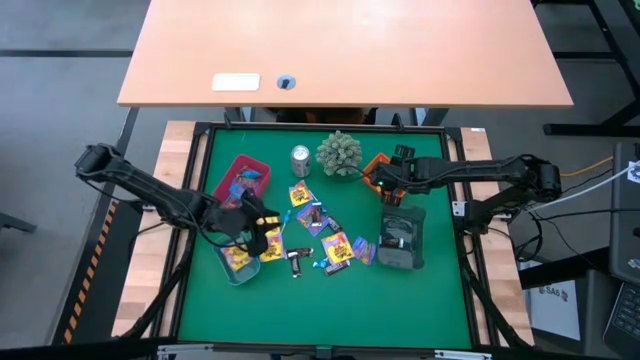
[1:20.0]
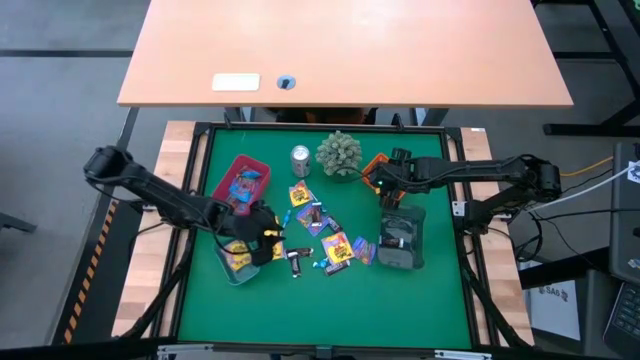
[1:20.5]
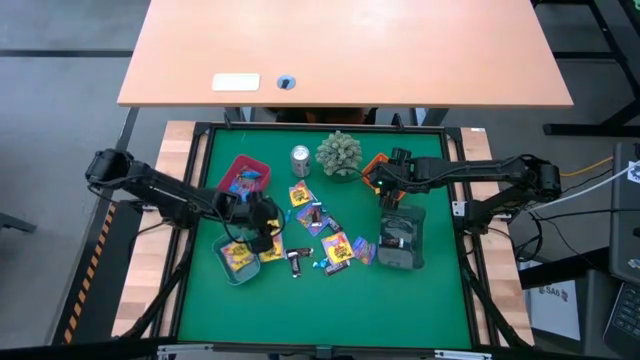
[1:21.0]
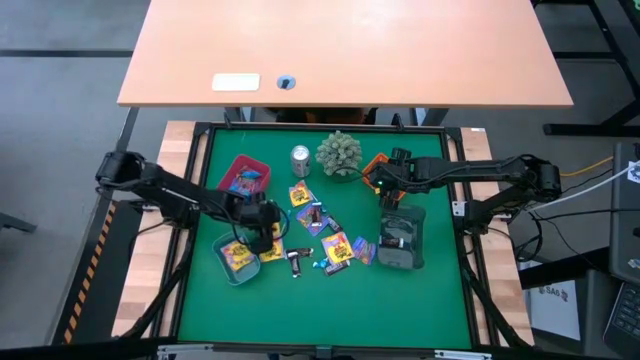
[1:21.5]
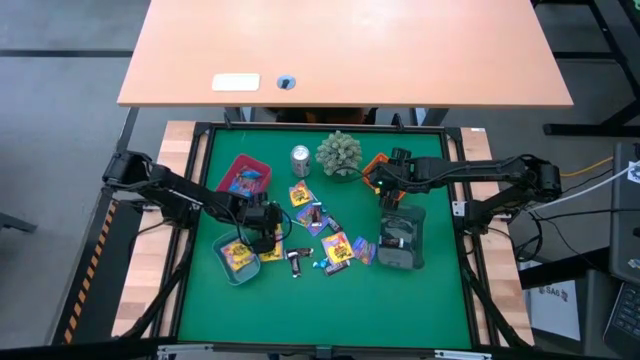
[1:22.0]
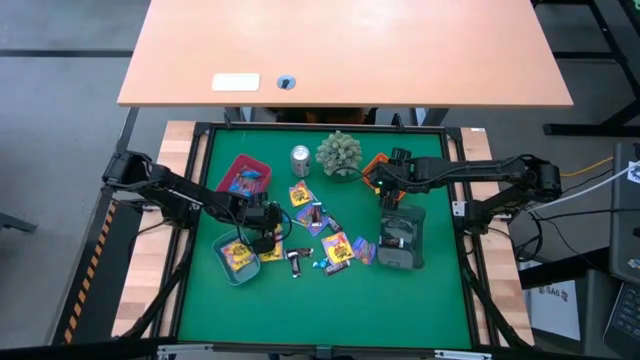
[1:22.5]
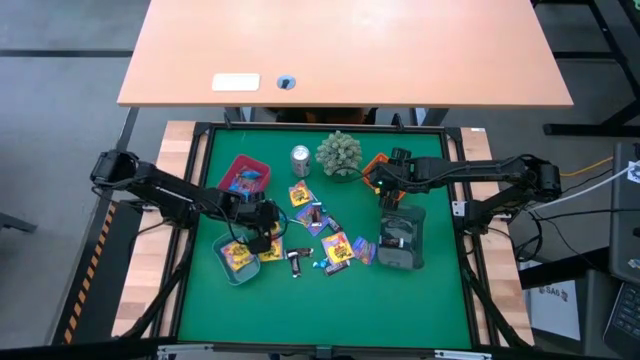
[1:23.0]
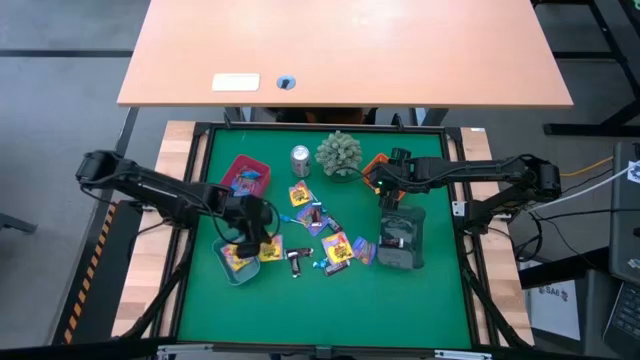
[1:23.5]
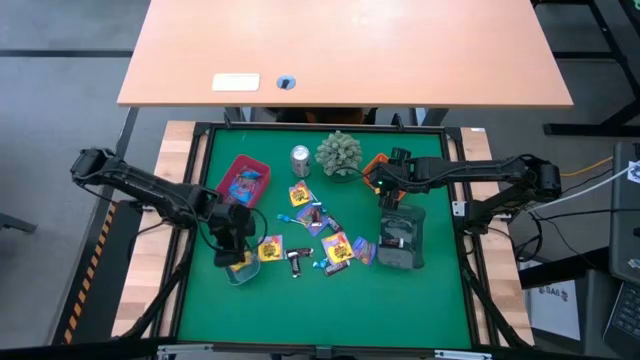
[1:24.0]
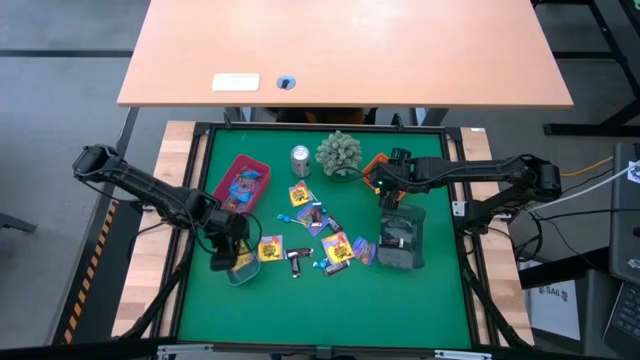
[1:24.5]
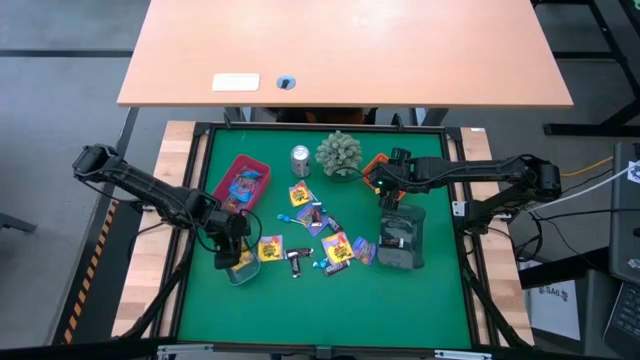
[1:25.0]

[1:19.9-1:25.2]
Task: Sort candy
Put the yellow candy into the blue transparent bin

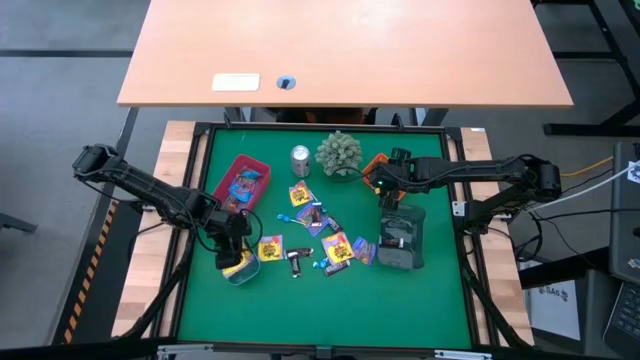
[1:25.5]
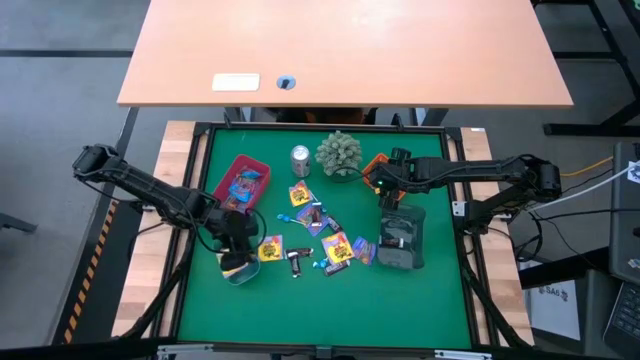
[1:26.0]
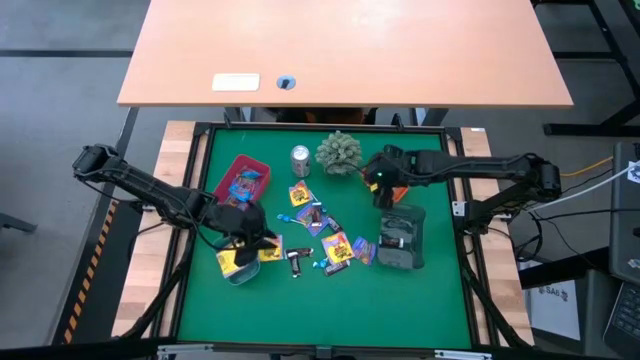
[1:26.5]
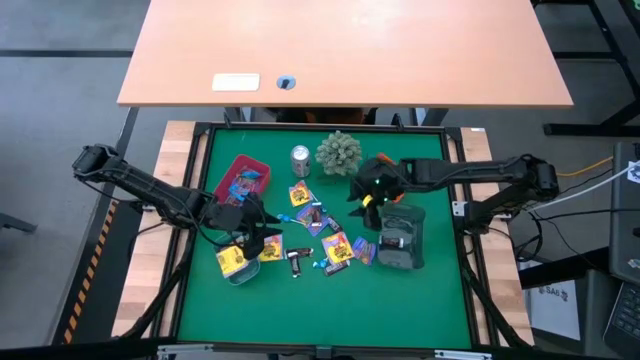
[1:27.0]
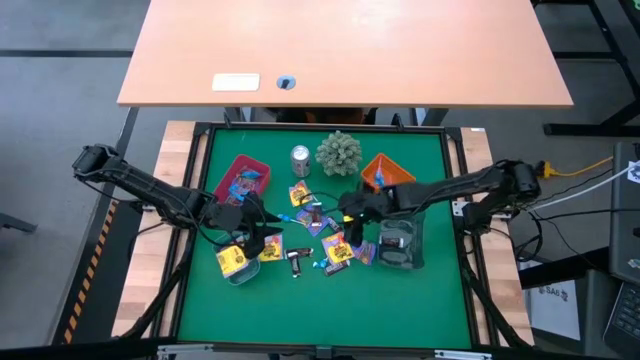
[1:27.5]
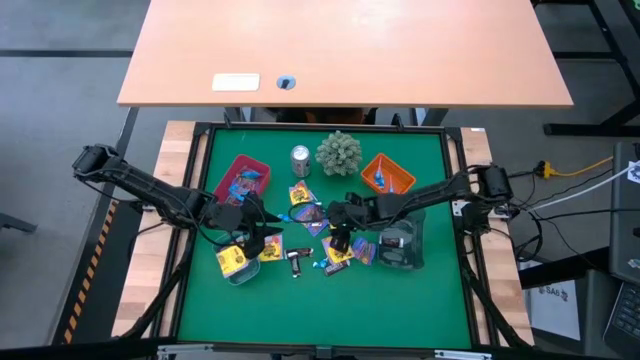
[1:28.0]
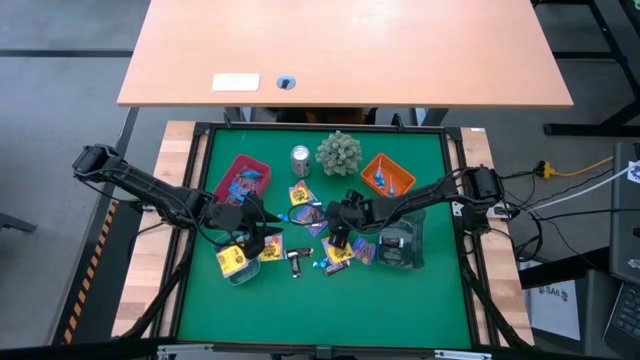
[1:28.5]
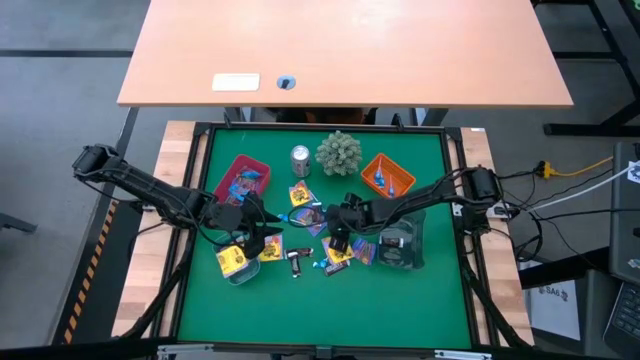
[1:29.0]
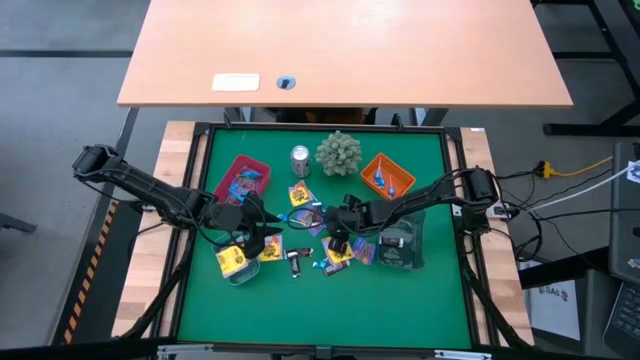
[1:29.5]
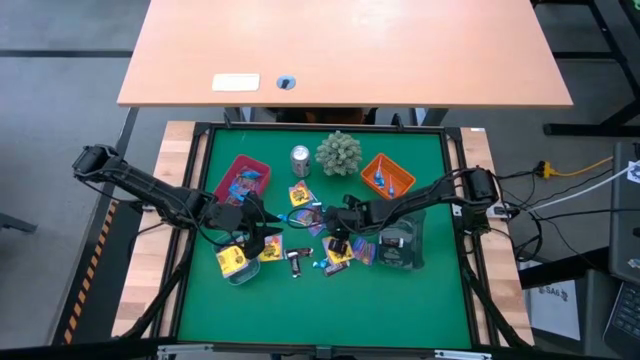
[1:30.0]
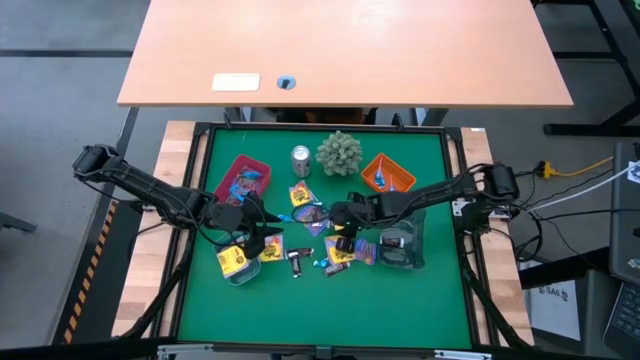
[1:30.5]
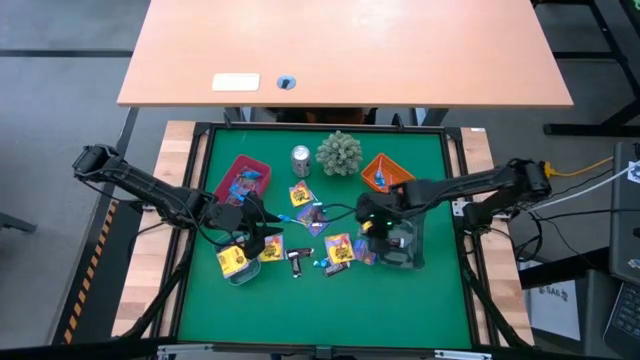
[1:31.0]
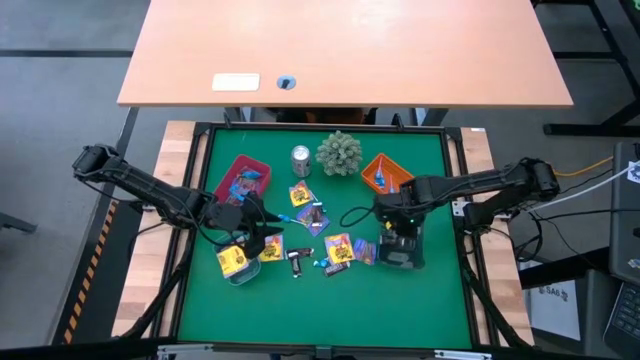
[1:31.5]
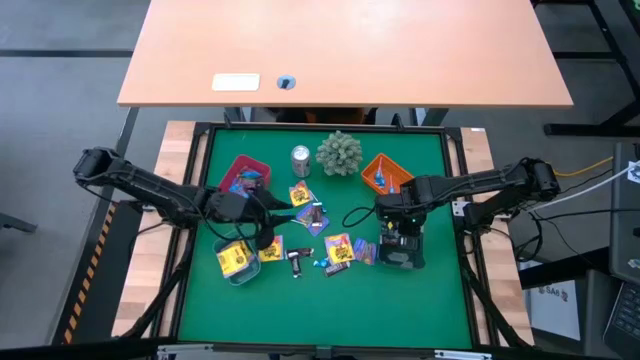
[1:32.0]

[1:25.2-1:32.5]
Put the brown chocolate candy into the black bin

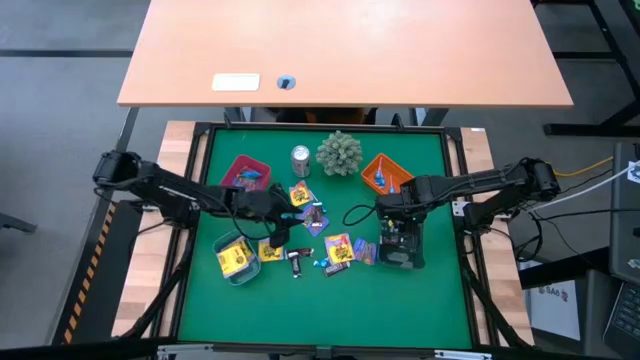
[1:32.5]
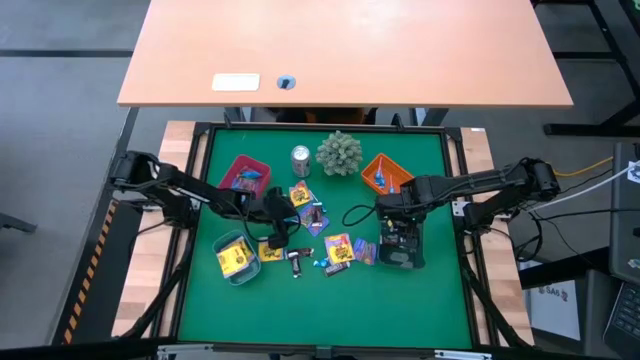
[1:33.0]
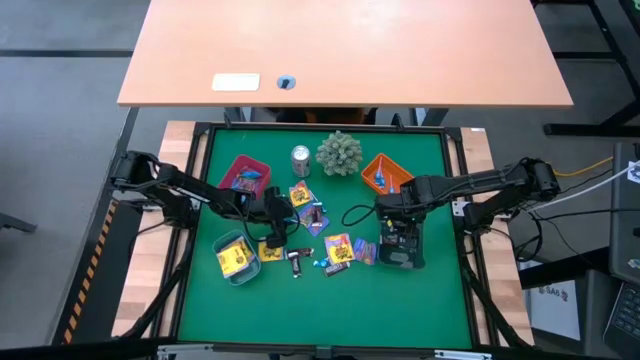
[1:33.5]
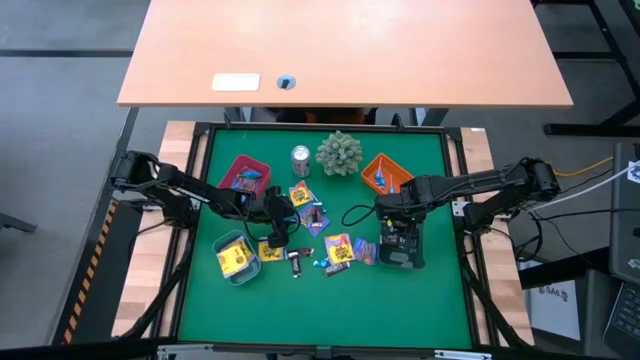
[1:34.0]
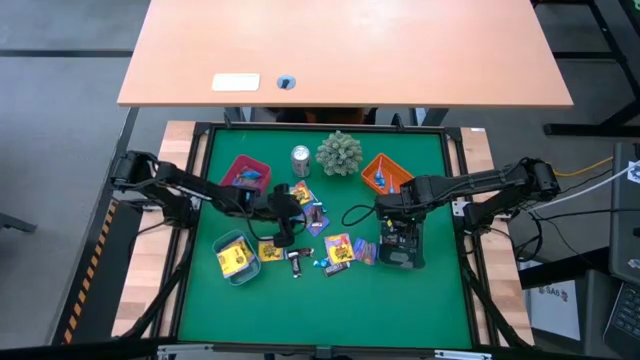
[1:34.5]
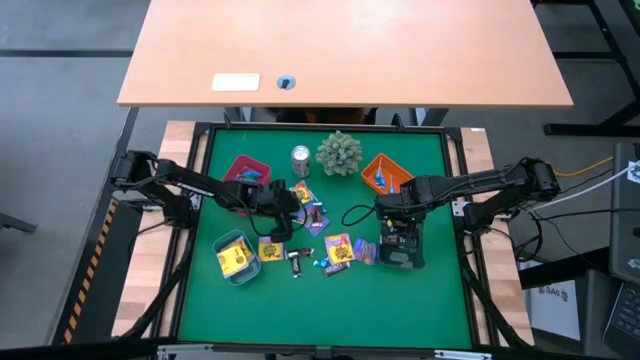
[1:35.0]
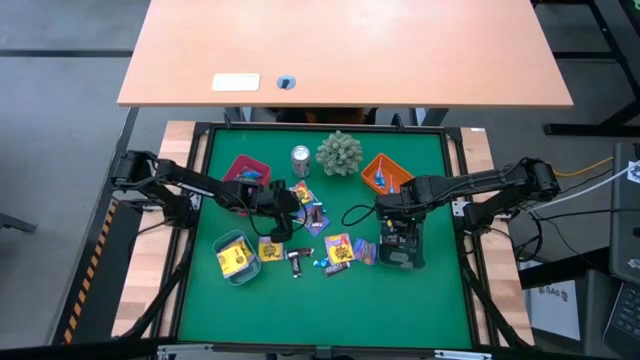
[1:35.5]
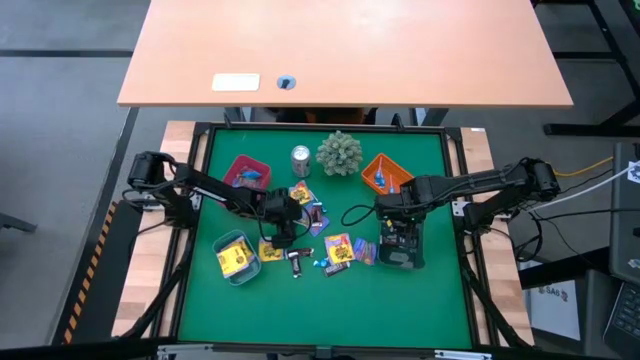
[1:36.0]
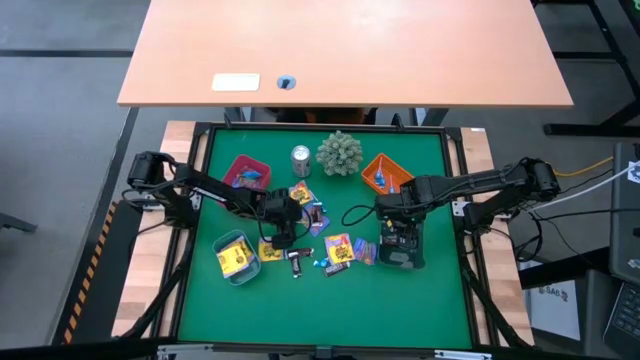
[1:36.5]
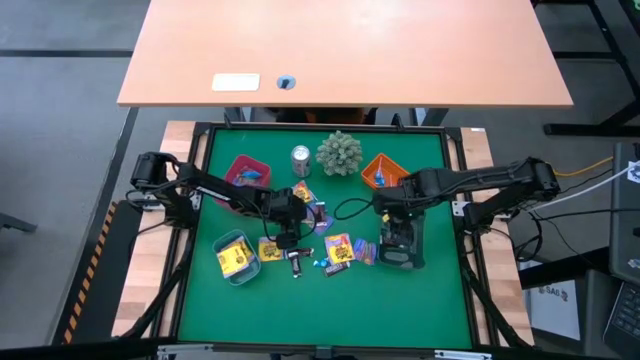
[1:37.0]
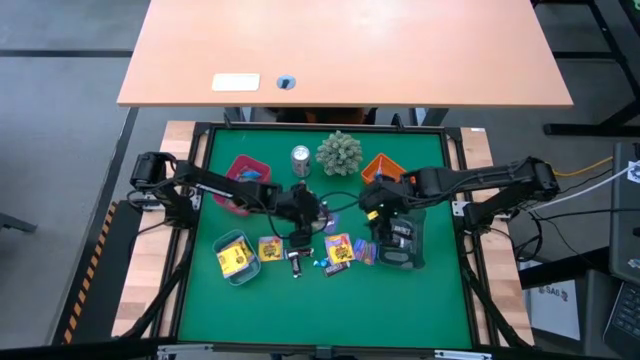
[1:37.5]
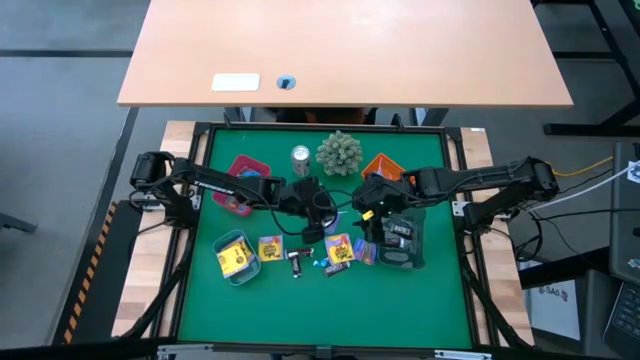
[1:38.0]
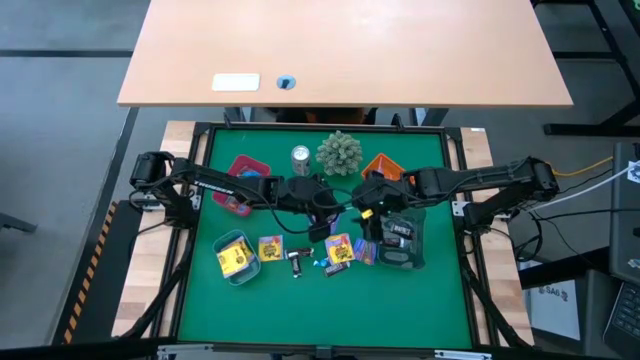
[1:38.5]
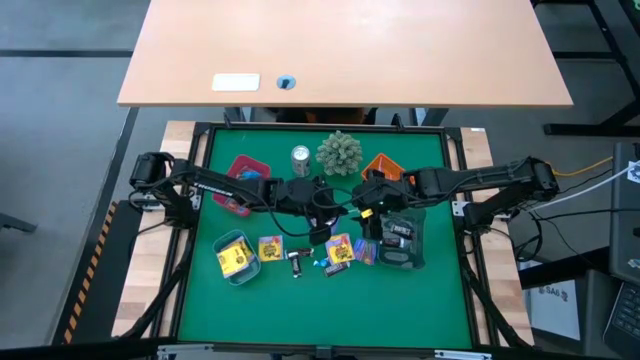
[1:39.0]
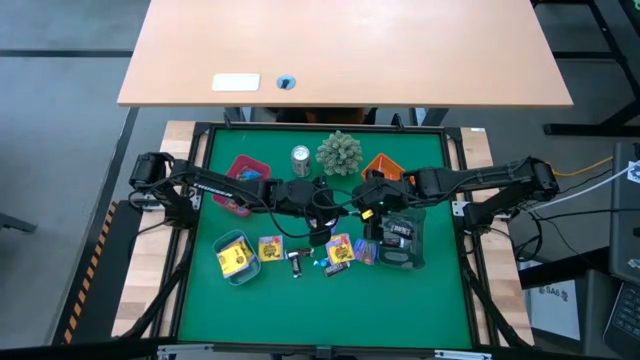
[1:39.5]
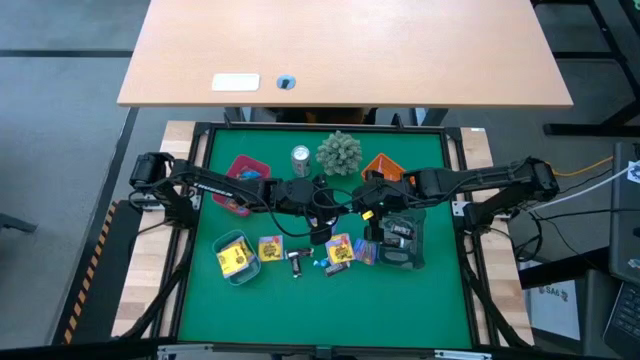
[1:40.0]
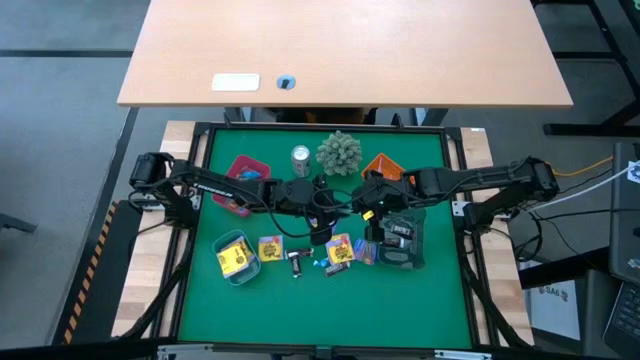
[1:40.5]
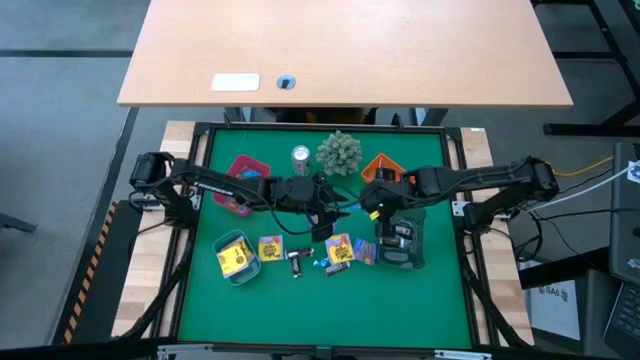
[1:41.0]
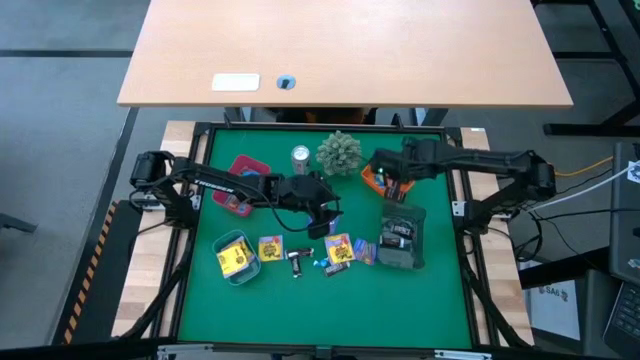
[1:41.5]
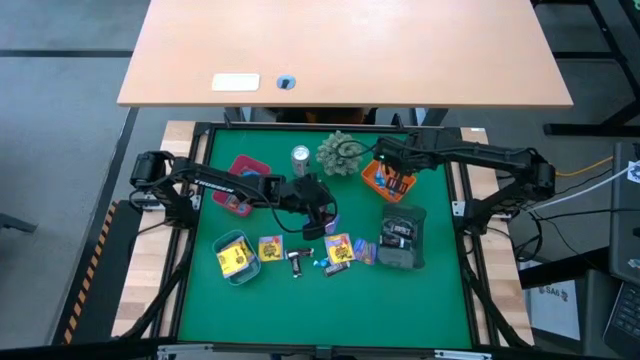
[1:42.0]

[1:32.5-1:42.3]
Put the blue candy into the orange bin
